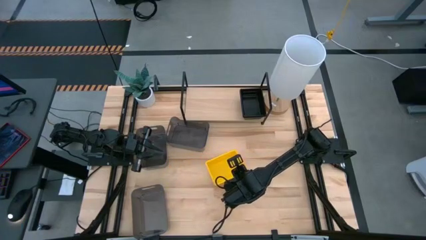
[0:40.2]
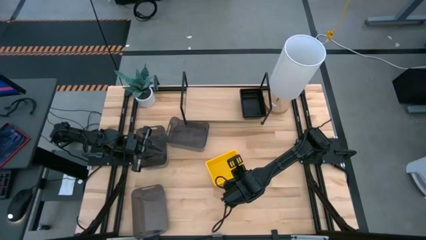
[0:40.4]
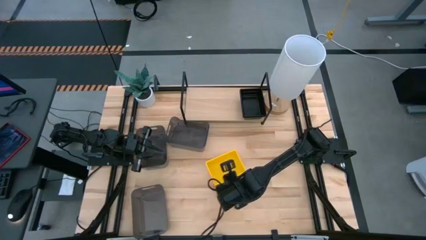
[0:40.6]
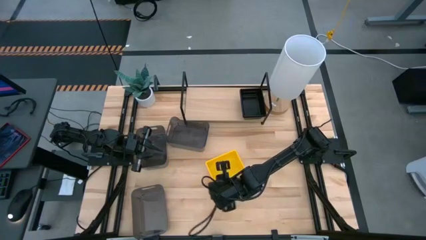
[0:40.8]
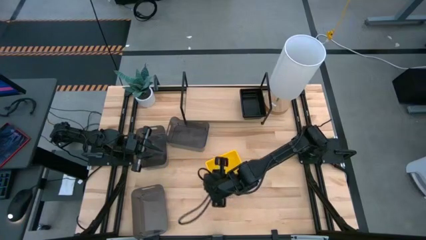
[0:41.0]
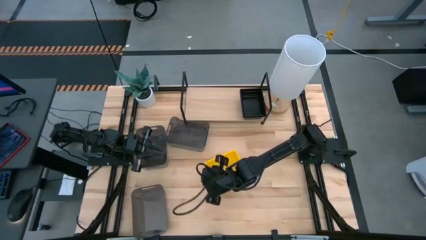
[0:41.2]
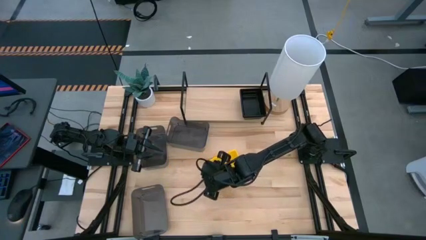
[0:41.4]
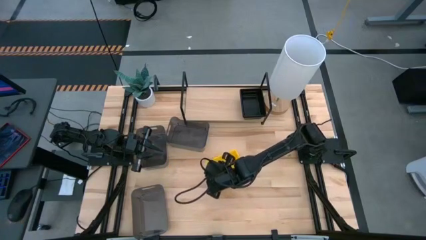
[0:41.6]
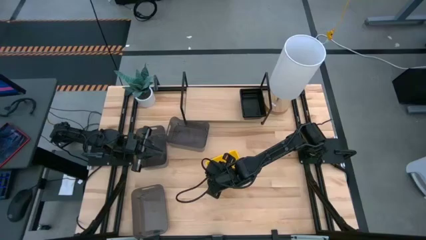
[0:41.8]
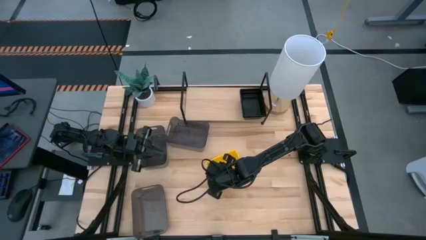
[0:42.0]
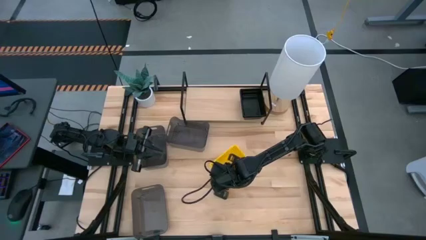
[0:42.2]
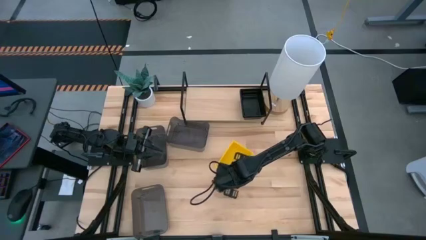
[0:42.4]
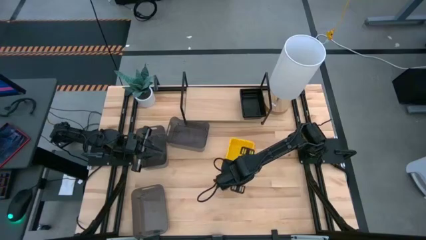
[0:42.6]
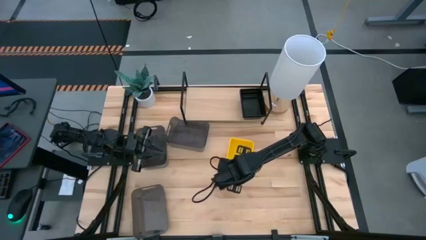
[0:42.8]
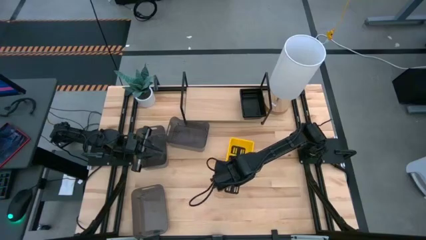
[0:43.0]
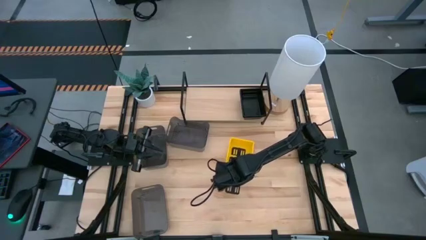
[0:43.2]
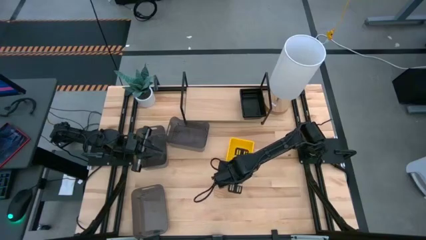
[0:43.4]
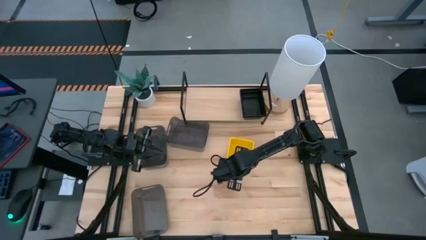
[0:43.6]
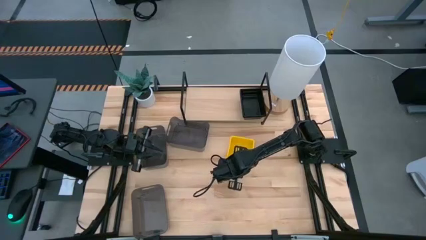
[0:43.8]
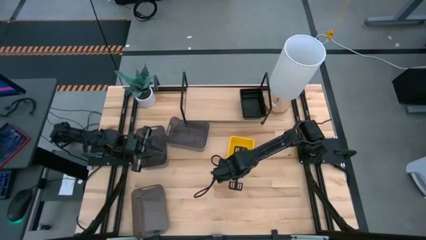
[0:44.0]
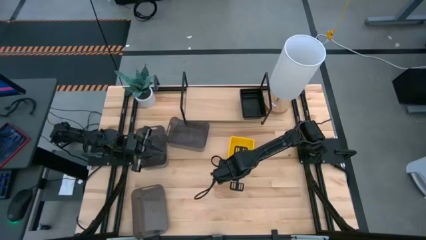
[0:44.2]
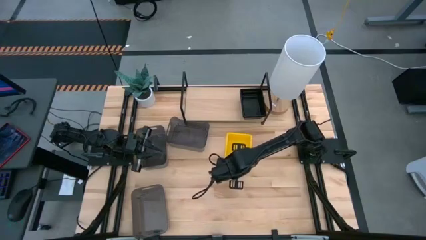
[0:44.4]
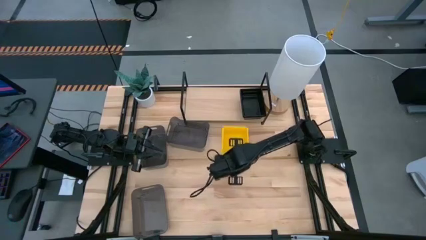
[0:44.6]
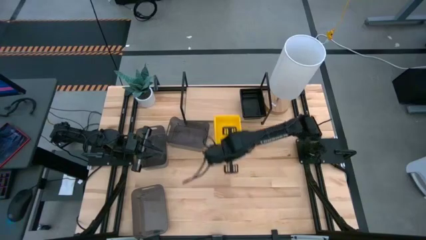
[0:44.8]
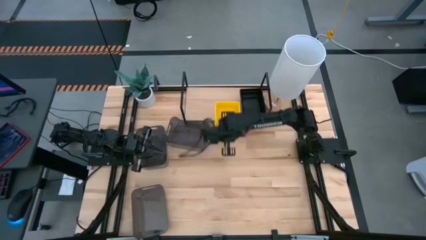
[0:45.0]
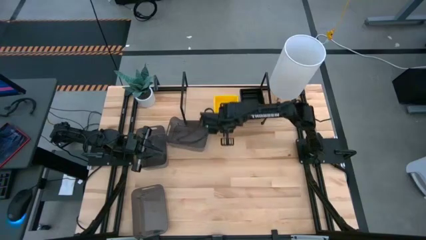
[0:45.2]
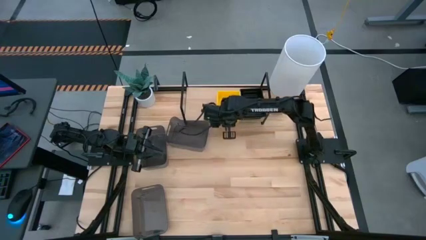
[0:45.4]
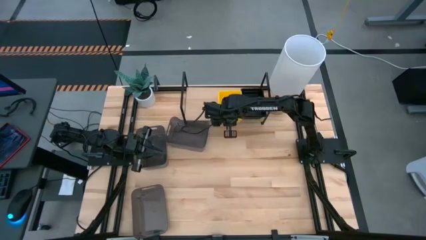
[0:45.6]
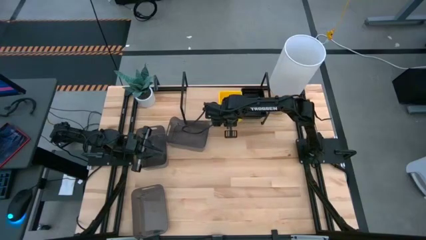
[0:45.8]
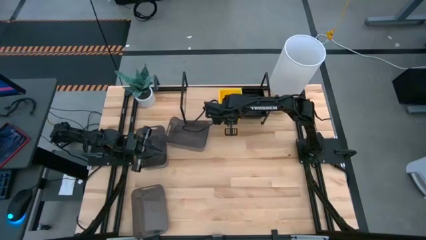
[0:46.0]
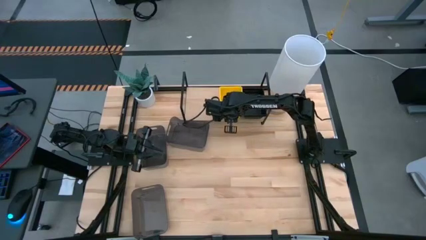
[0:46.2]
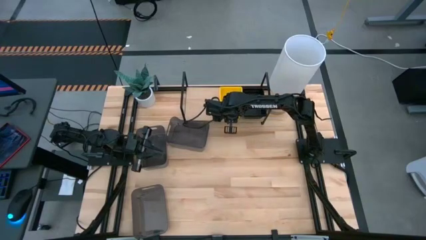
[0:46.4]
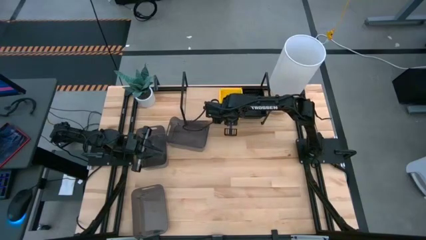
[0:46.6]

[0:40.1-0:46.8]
Task: Stack baskets on shelf by color
Put the stacked yellow bins on the shelf

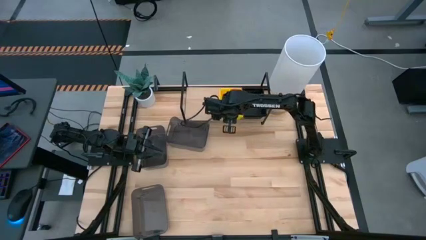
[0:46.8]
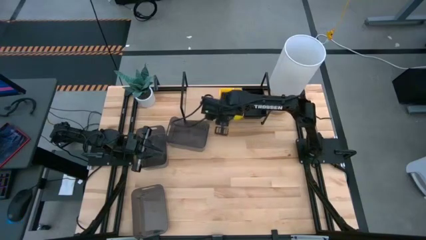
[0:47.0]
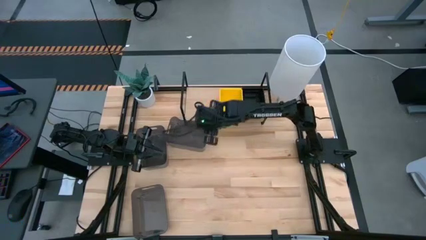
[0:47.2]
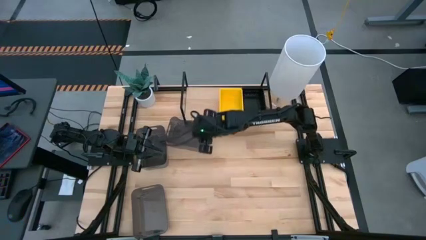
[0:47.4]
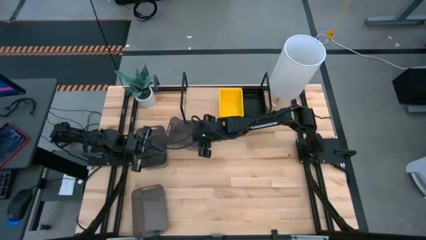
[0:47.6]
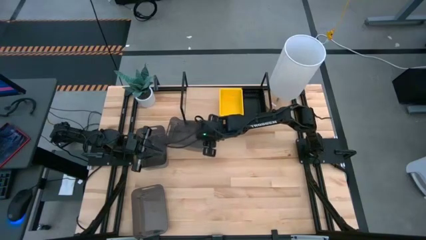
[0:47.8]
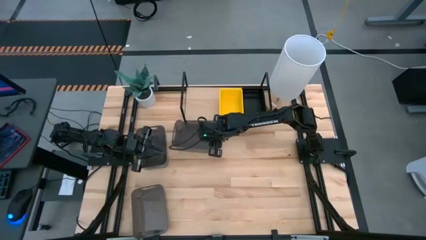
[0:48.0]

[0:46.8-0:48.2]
Move the right gray bin to the center of the table

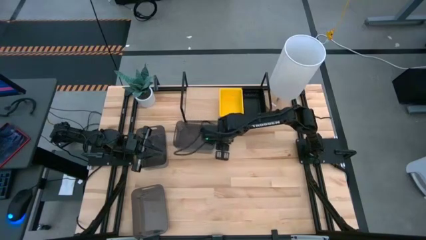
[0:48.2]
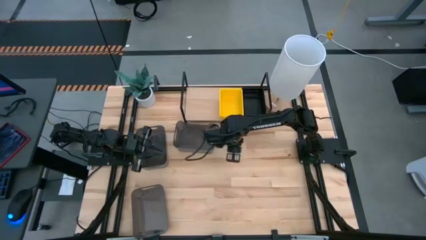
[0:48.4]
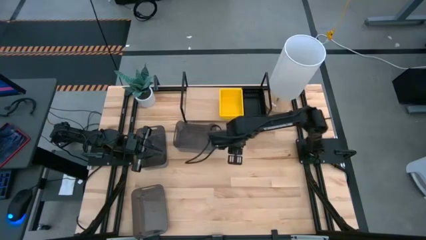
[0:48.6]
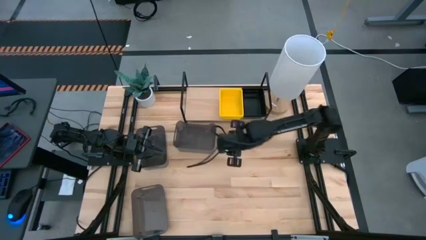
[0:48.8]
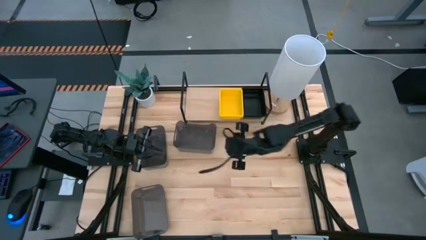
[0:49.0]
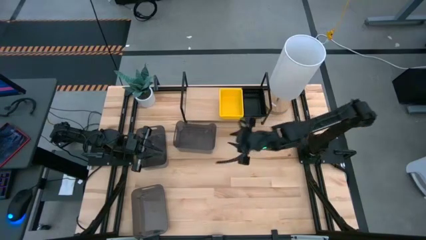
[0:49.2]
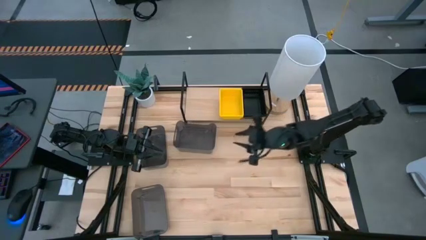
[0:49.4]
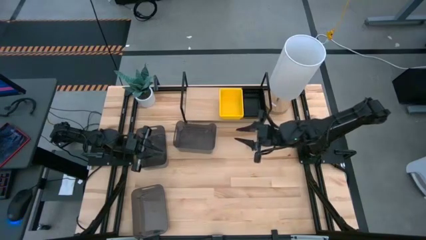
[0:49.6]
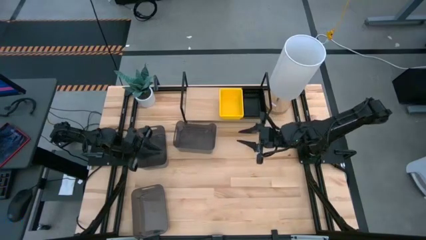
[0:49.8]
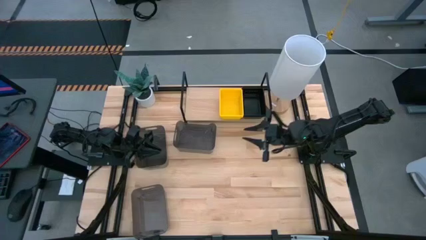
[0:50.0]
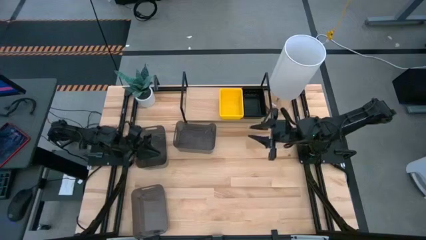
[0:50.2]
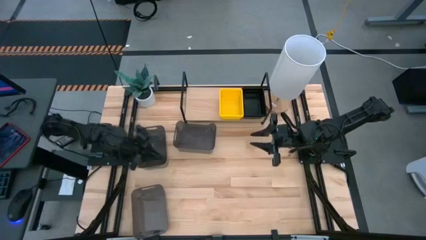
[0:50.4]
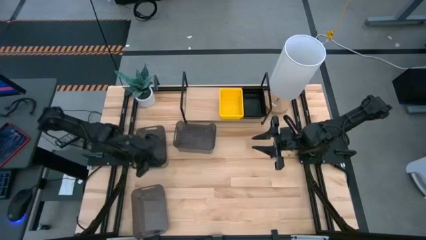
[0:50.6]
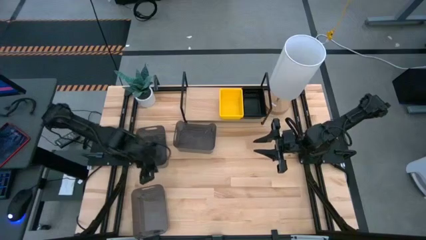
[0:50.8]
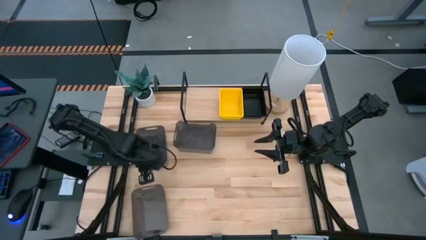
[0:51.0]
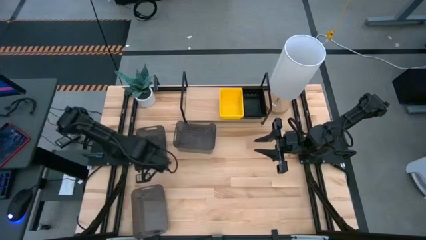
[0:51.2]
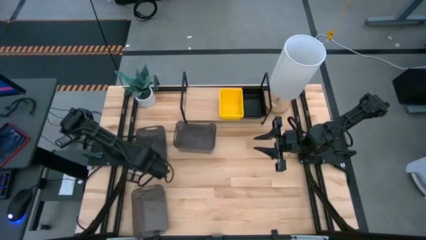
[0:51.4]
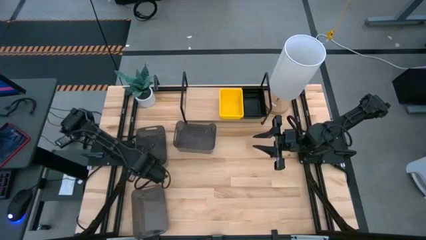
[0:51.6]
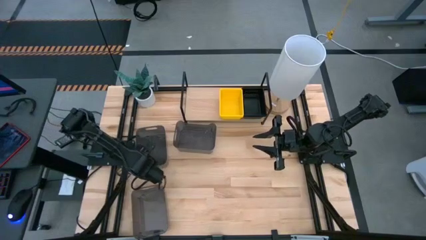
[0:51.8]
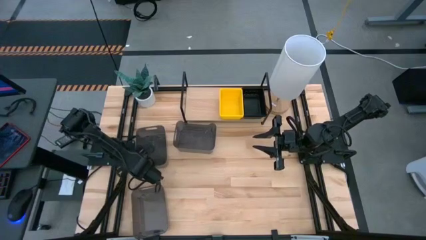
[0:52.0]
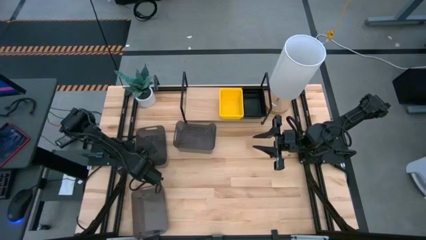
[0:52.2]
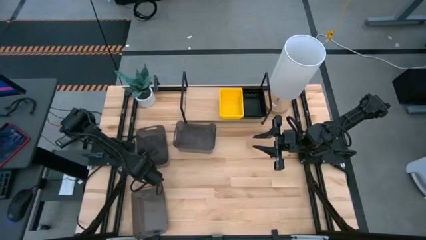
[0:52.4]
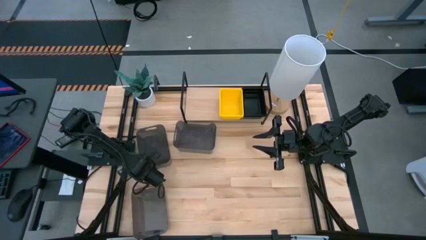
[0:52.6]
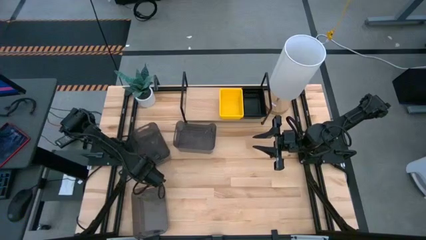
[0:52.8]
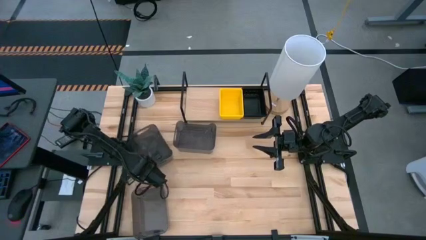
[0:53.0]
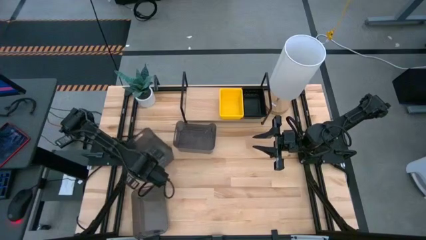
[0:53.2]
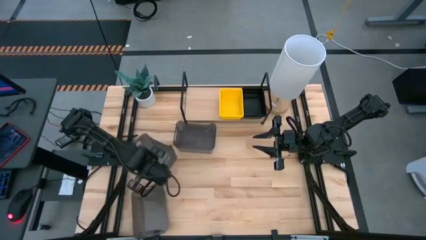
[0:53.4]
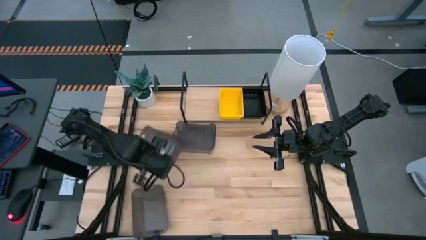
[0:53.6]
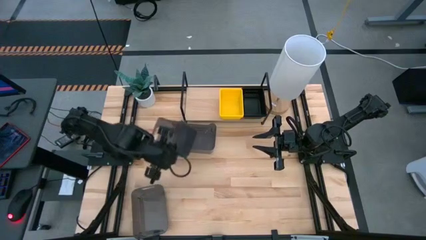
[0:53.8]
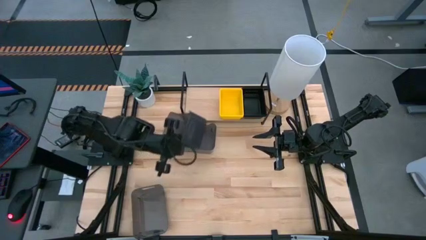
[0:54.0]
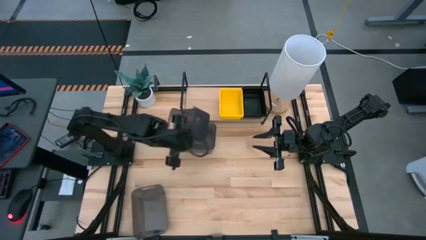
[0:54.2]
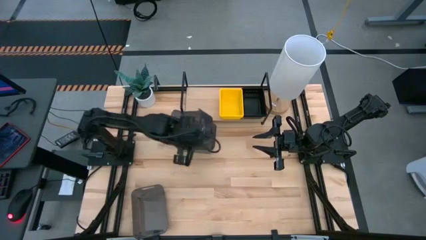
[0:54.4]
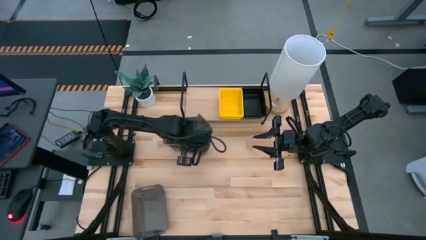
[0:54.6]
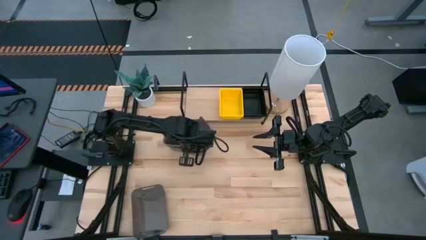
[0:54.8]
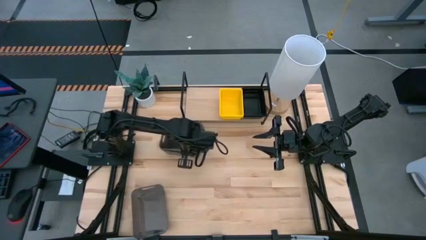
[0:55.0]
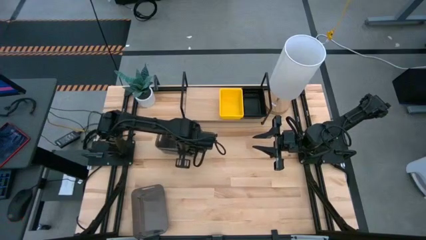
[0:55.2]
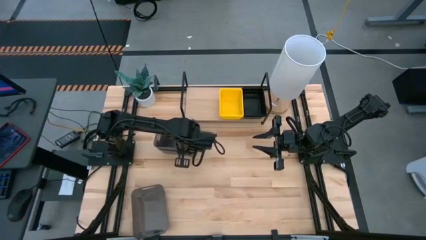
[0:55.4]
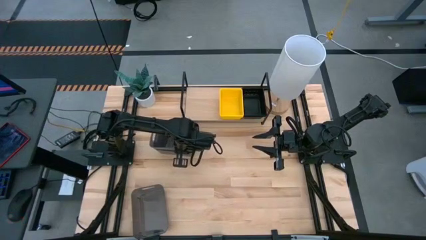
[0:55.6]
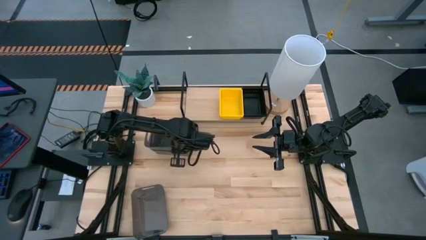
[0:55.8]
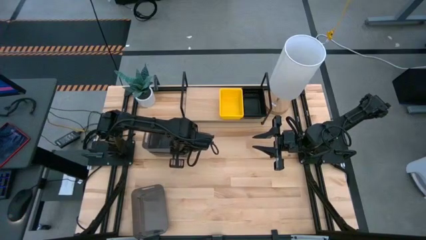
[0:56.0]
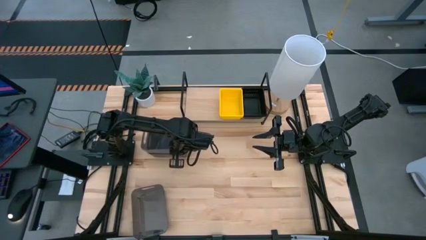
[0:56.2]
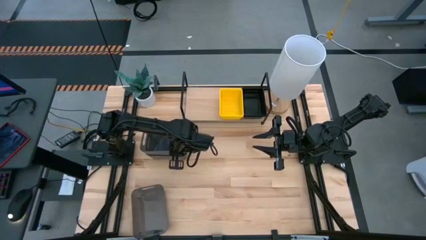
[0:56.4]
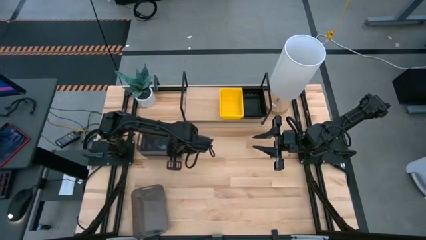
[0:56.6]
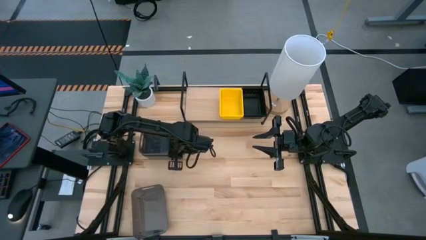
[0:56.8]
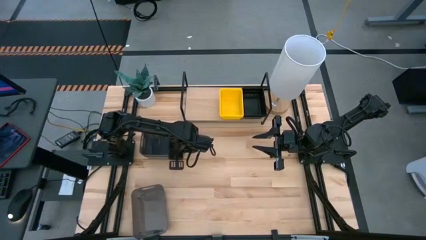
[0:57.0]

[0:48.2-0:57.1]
Stack the top left gray bin on the top right gray bin
